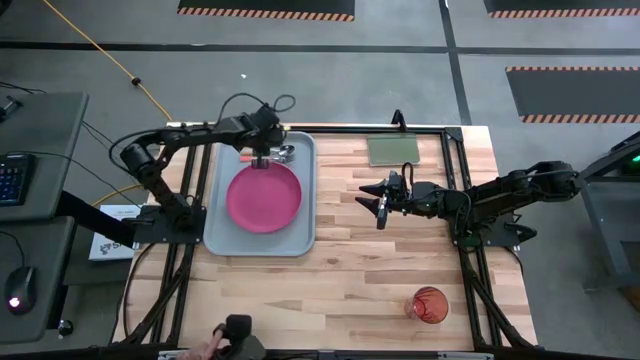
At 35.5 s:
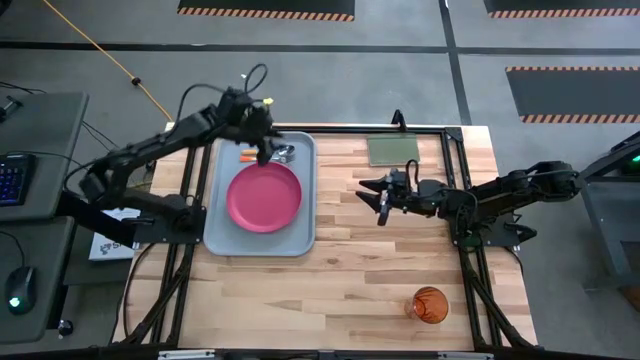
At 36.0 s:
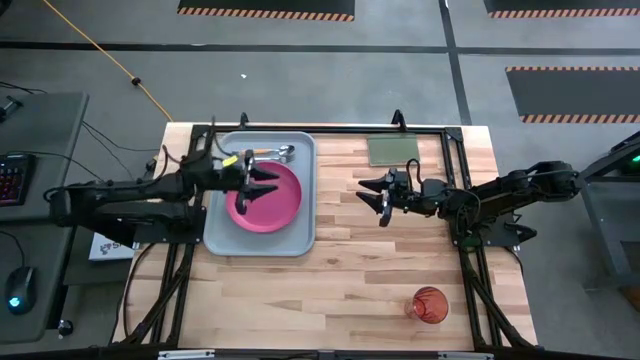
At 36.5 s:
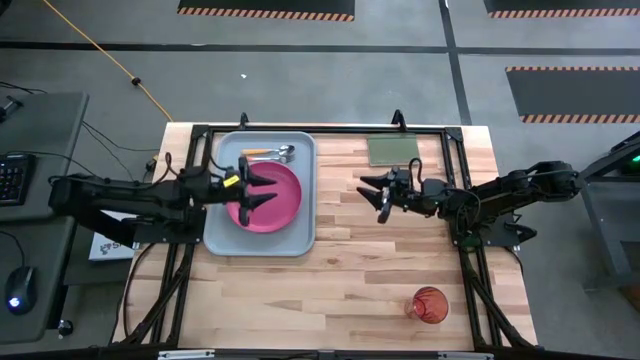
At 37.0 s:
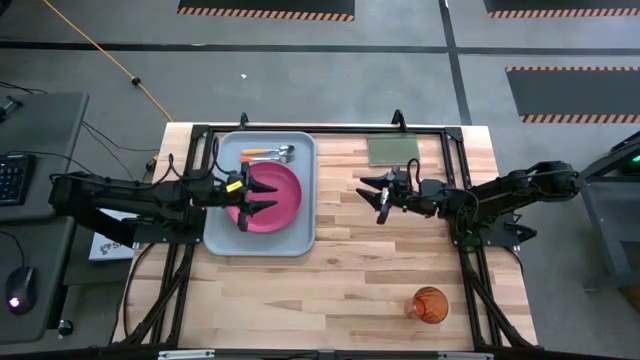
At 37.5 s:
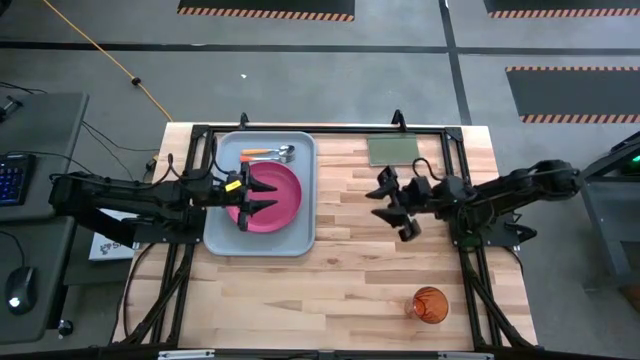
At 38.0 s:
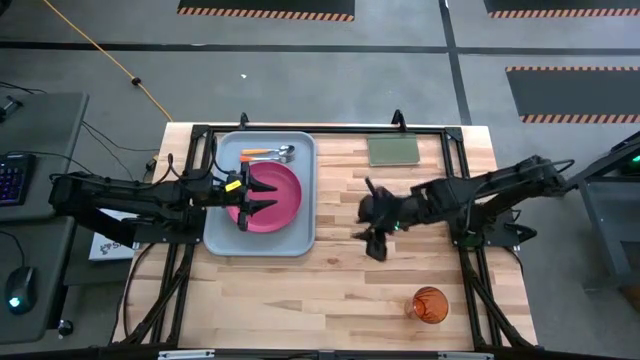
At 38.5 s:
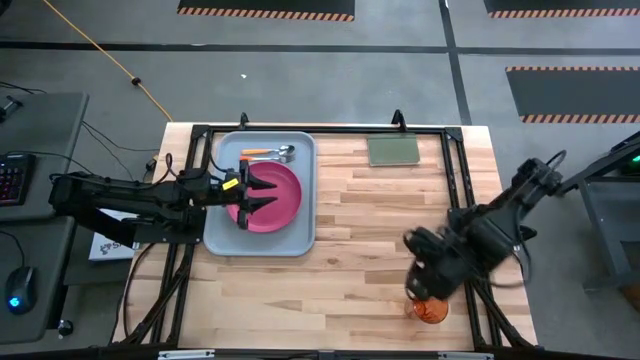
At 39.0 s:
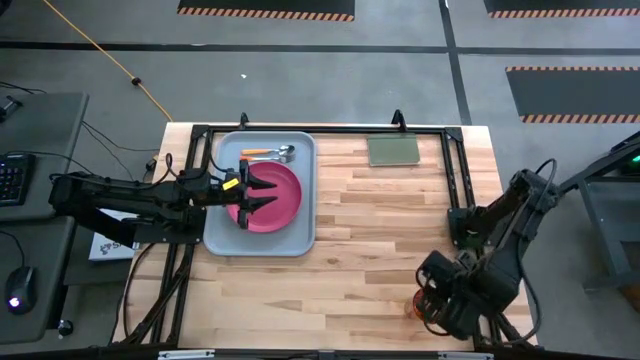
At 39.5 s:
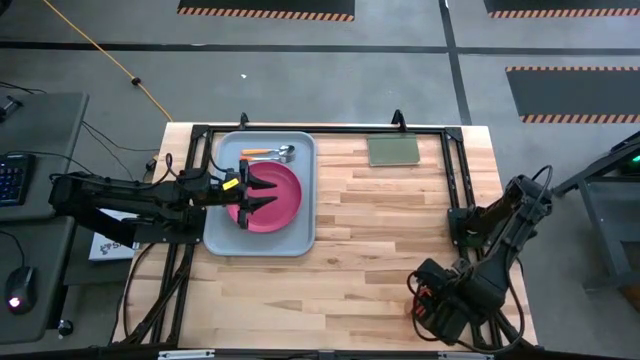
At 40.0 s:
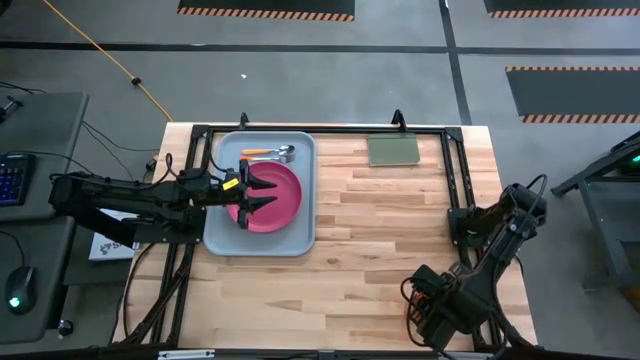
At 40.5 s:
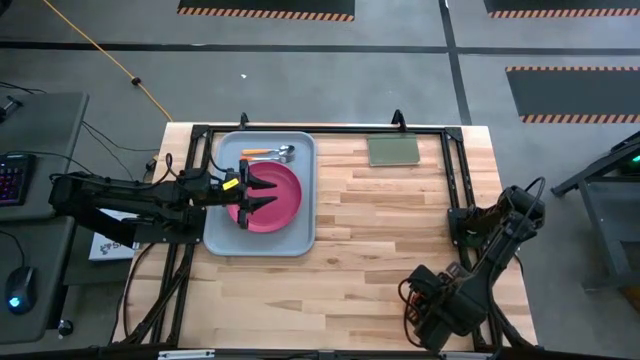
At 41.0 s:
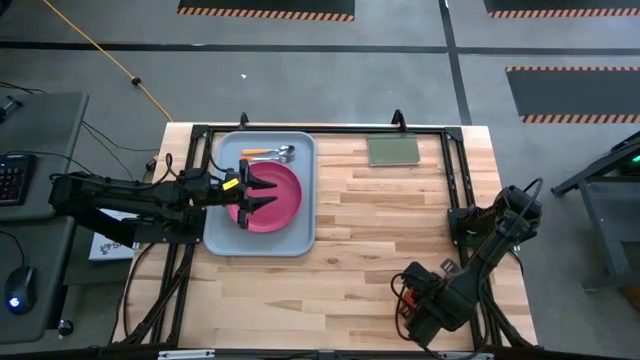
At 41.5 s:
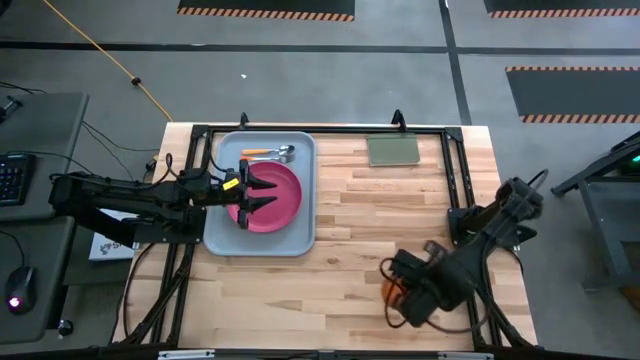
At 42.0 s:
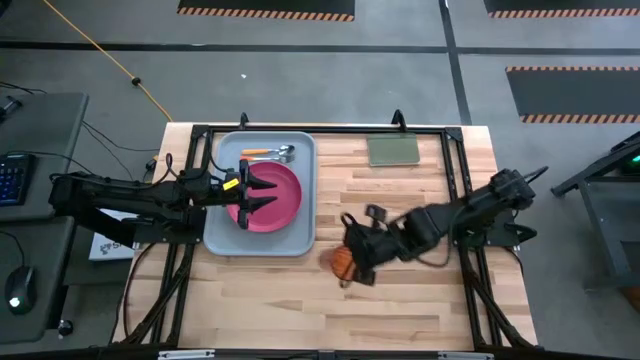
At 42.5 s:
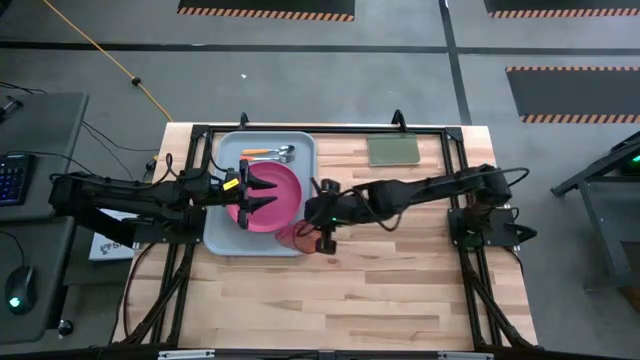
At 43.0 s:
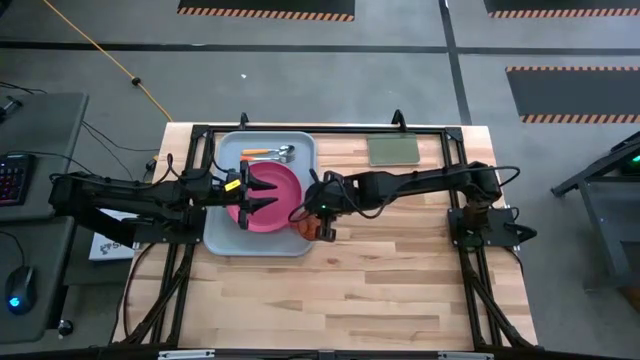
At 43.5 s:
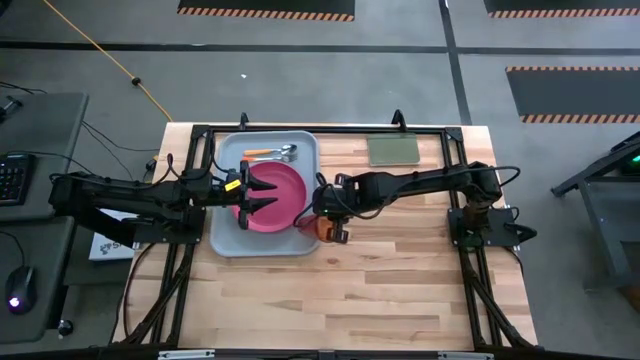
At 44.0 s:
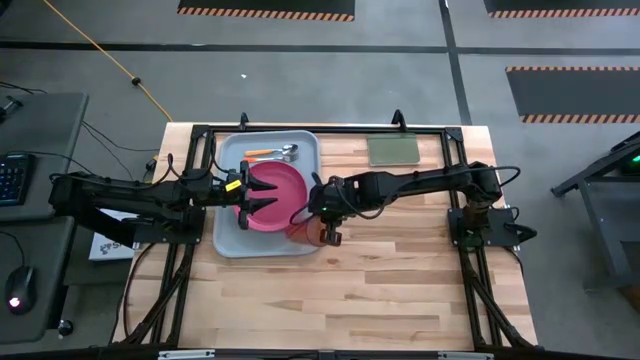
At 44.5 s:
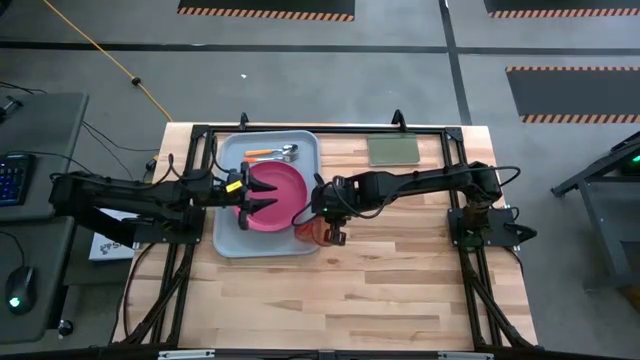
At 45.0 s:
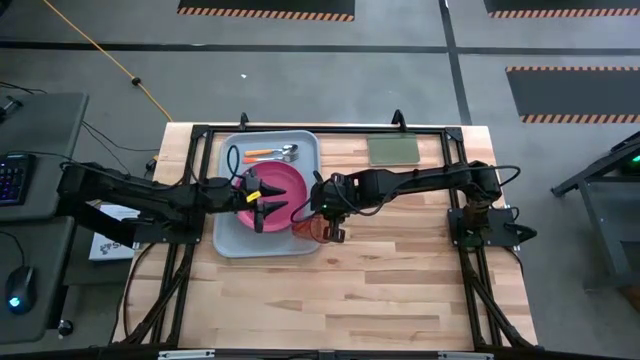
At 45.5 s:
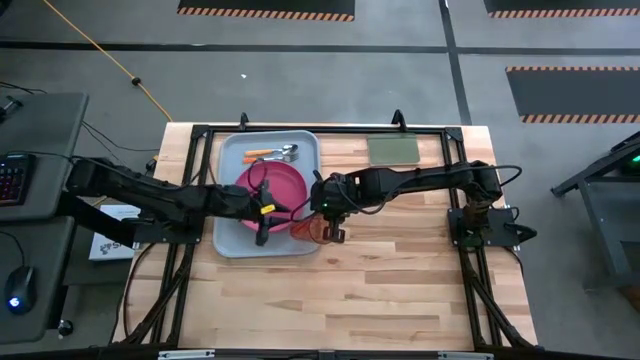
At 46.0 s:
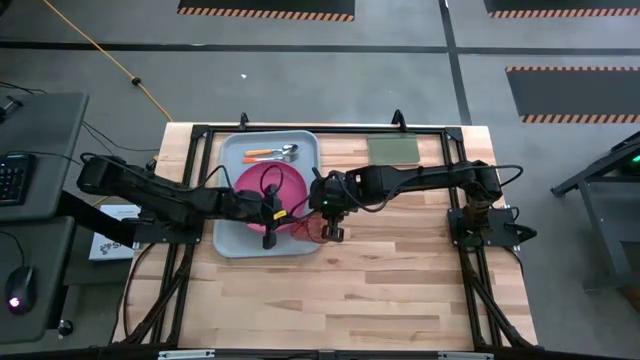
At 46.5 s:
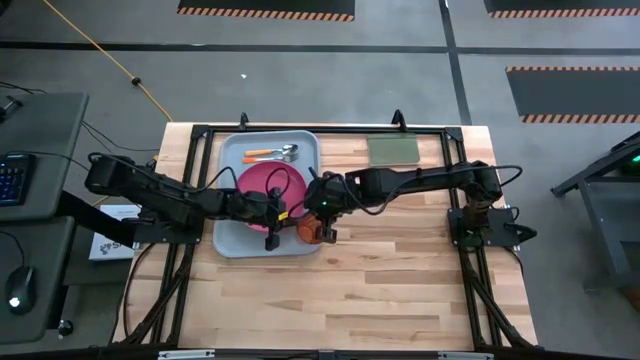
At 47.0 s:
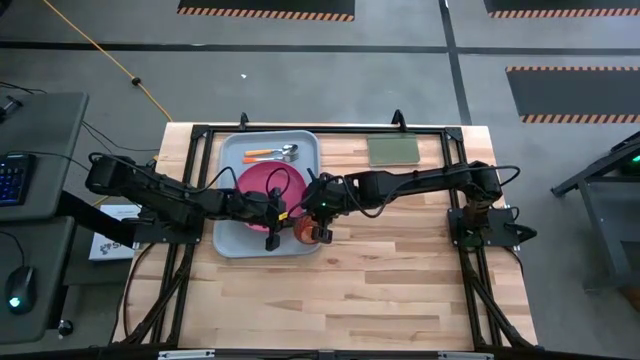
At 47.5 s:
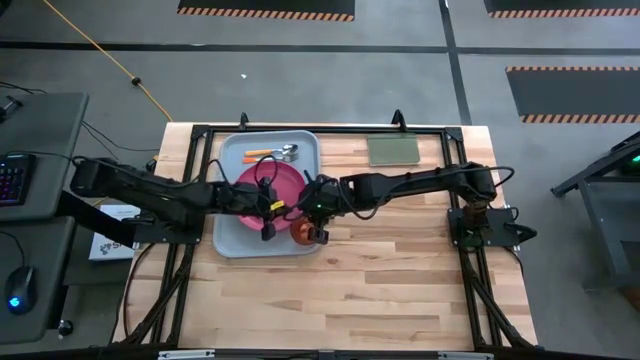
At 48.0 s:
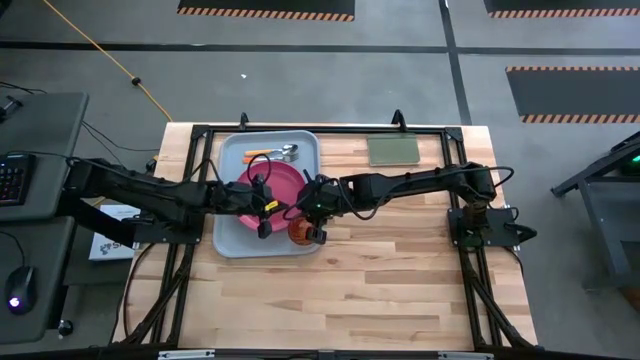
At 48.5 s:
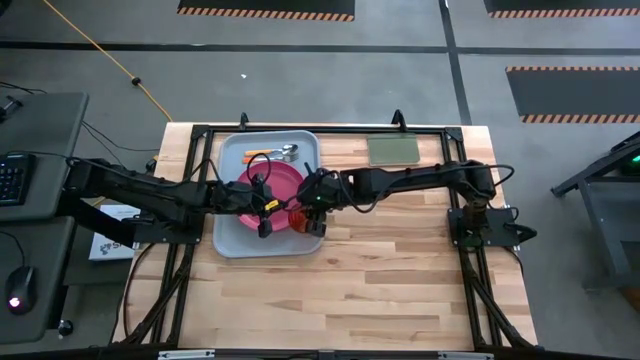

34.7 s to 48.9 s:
Task: Pick and place plate/cup/fork/spoon on tray
Put the orange glass on the gray serving tray to the bottom of the pink plate

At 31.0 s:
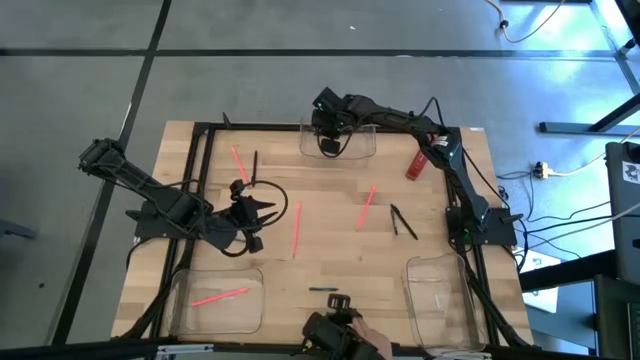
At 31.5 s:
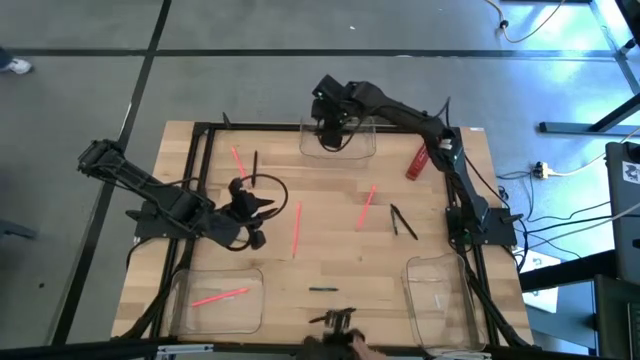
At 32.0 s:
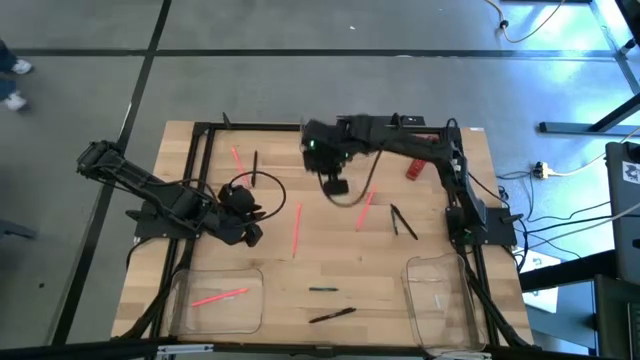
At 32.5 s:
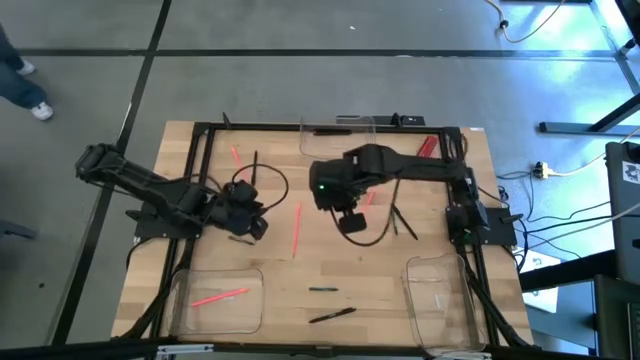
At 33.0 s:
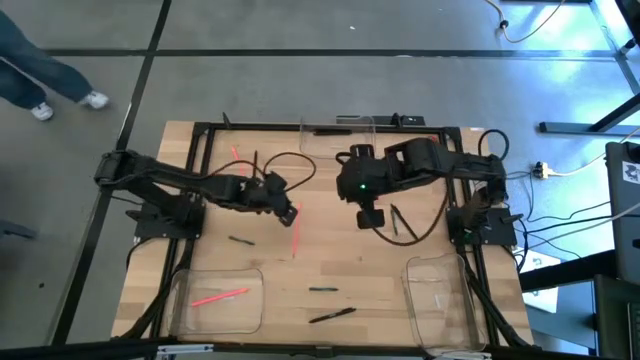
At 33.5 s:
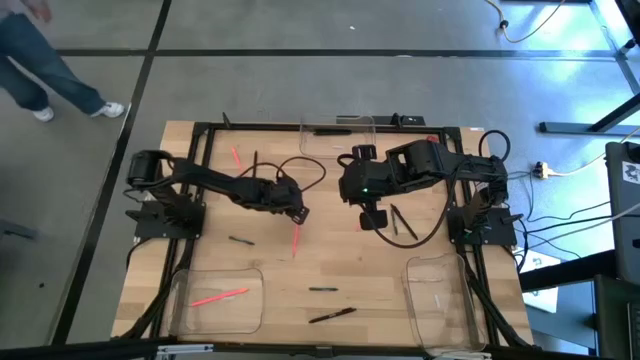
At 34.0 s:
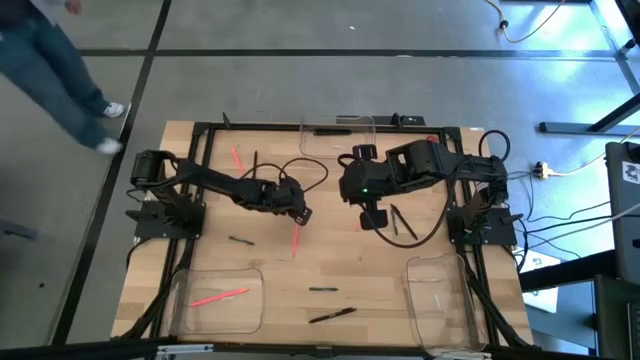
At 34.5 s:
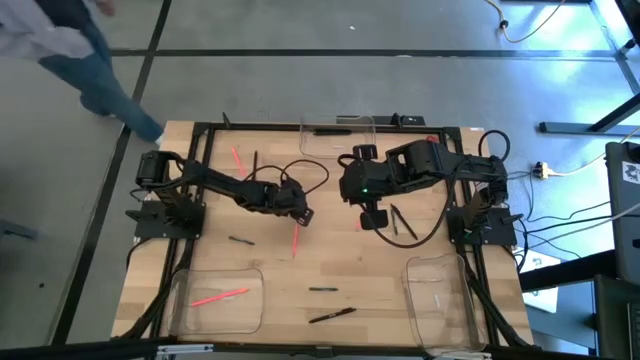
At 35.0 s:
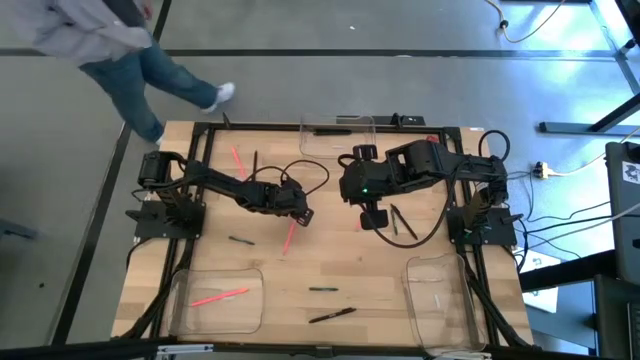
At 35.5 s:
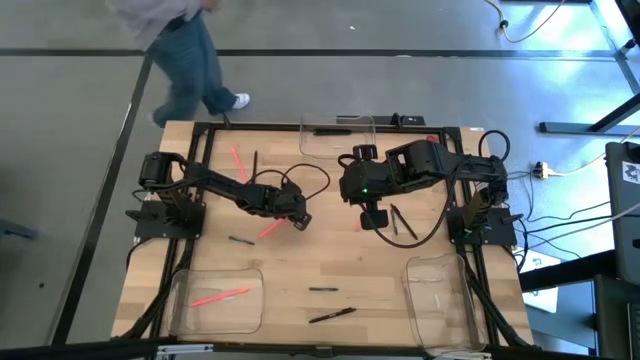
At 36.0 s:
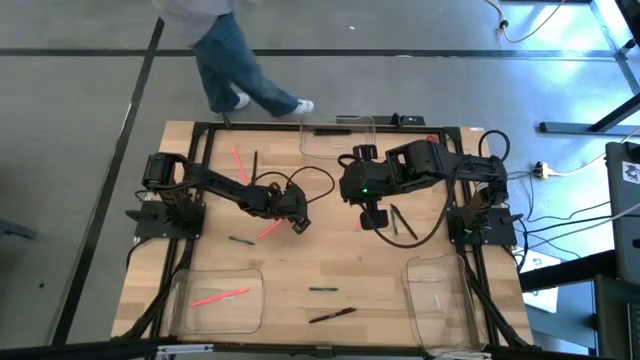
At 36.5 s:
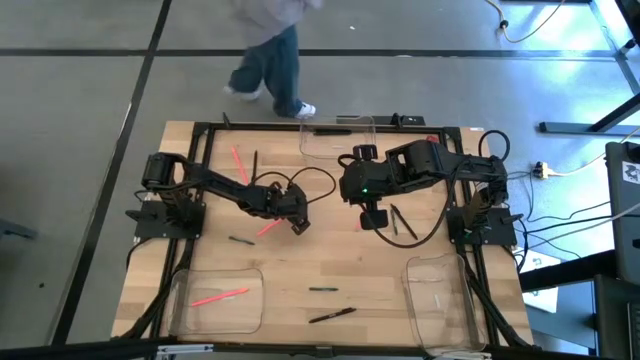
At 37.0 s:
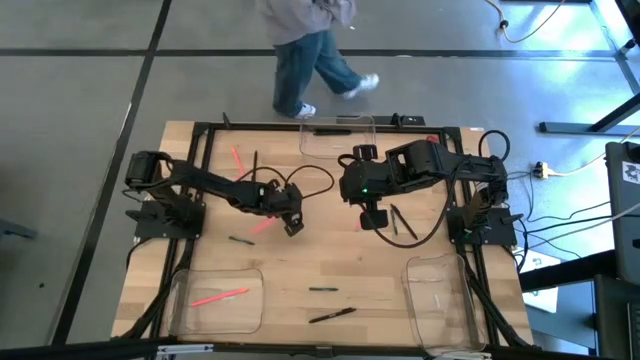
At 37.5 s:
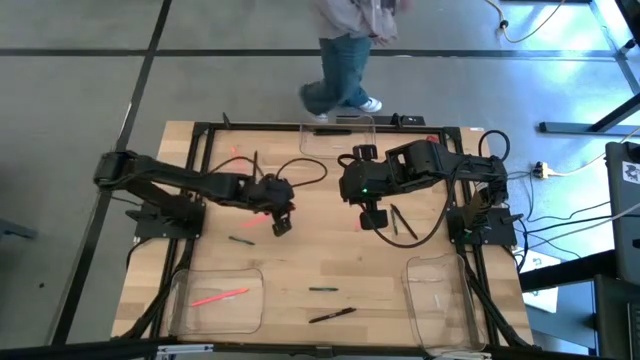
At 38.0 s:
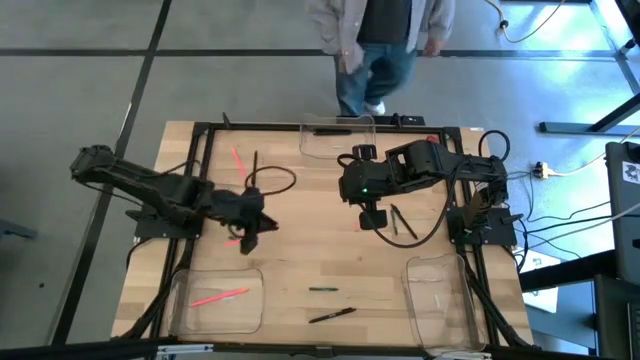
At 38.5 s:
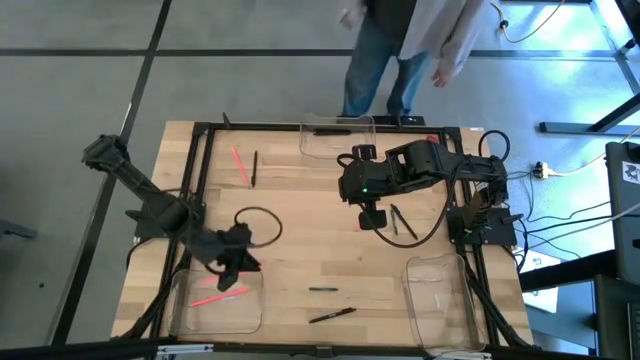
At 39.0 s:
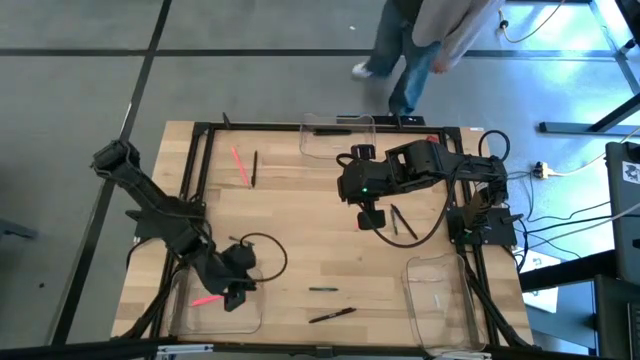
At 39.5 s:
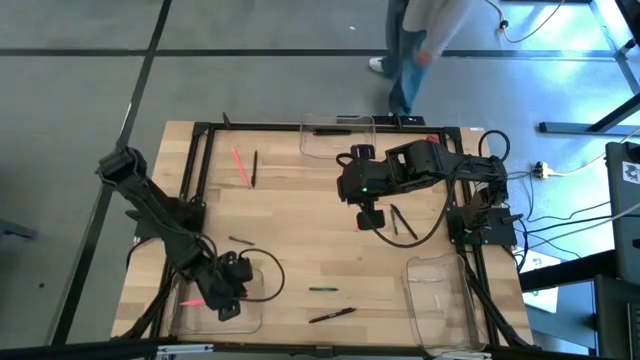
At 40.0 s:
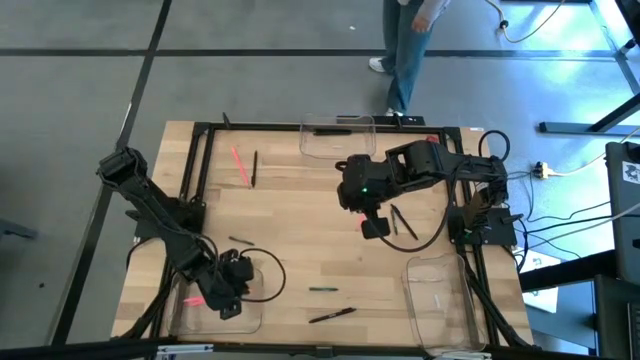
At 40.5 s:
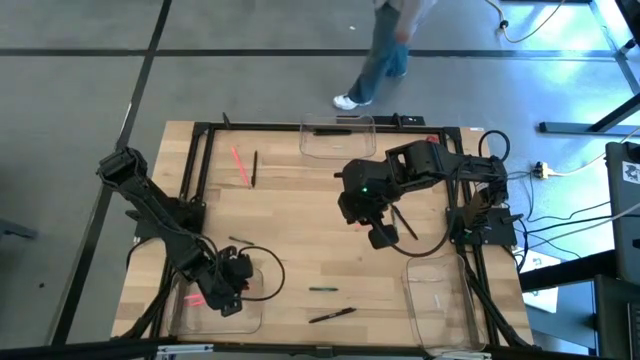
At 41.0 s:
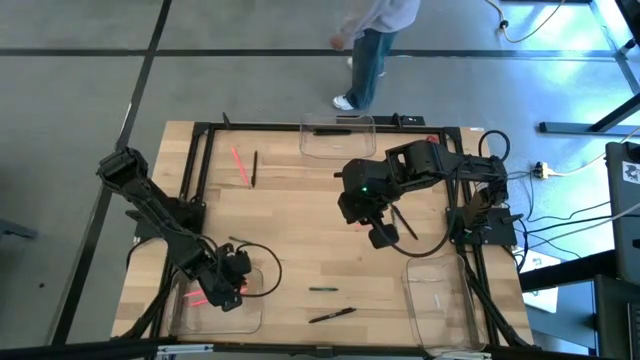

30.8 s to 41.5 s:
Task: Sort crayons/erasers/pens/pencils in bins
Put the pink colored pencil into the bottom left transparent bin
